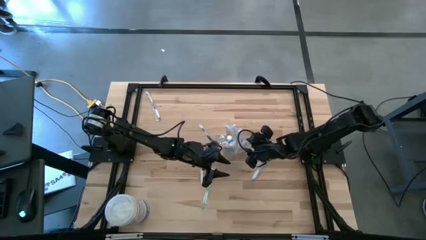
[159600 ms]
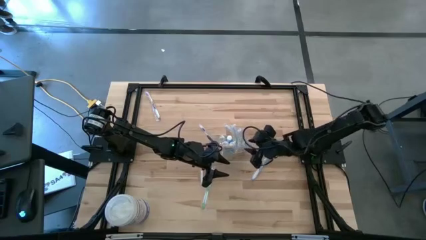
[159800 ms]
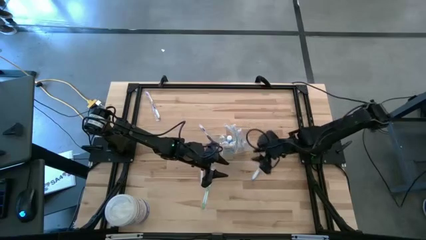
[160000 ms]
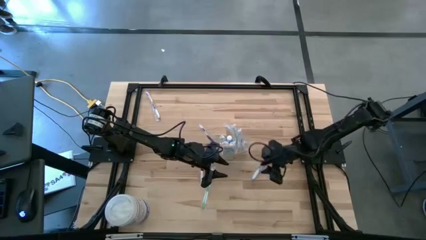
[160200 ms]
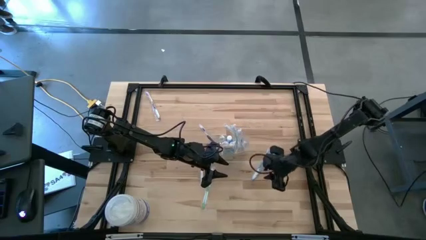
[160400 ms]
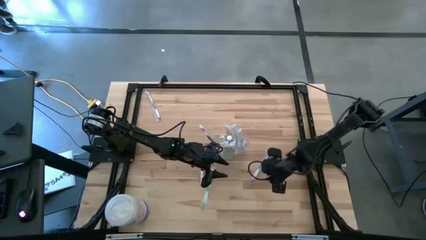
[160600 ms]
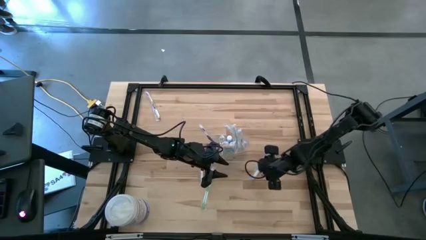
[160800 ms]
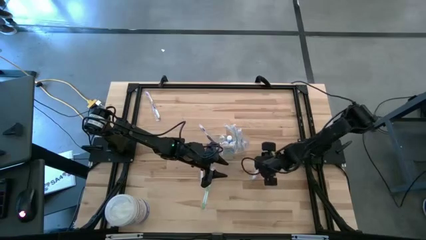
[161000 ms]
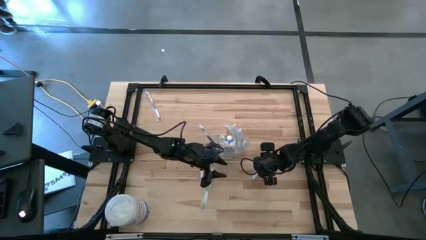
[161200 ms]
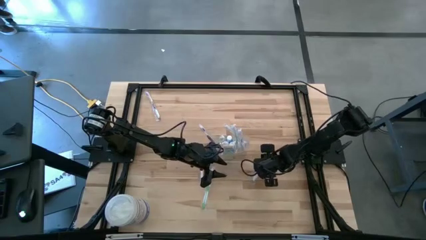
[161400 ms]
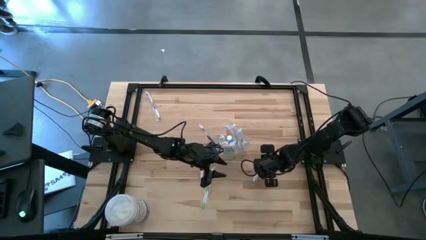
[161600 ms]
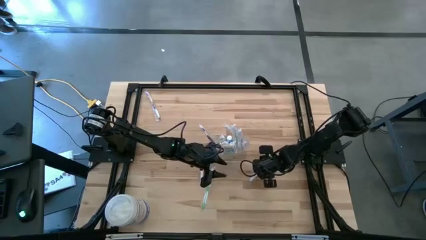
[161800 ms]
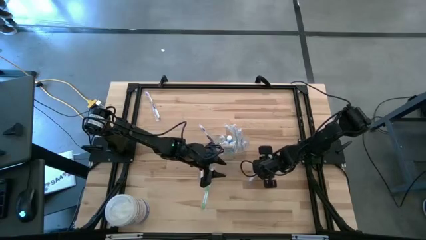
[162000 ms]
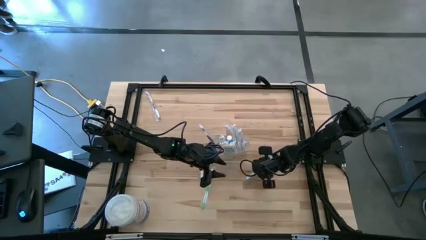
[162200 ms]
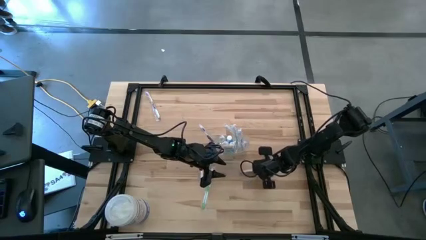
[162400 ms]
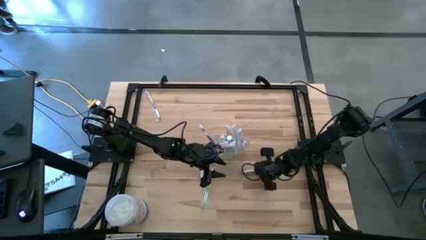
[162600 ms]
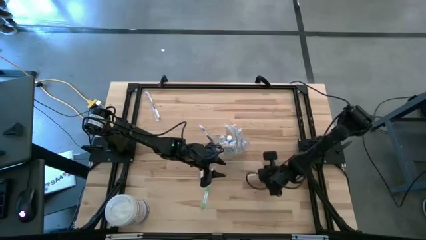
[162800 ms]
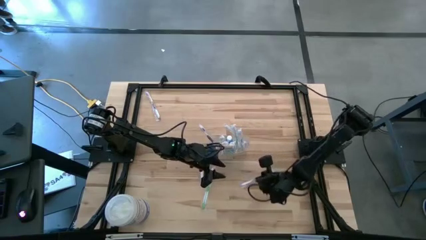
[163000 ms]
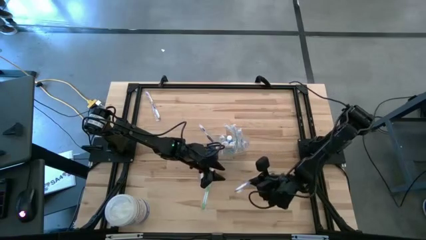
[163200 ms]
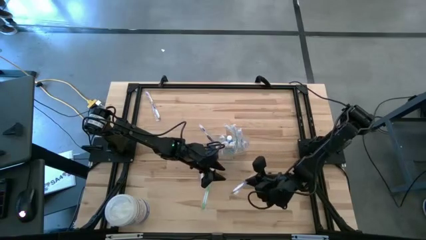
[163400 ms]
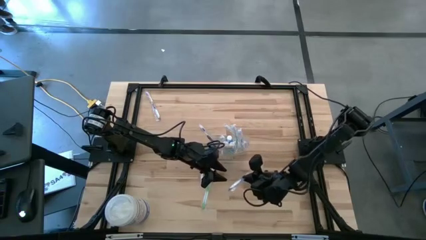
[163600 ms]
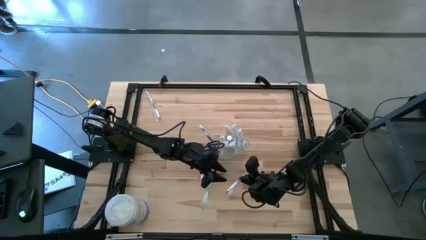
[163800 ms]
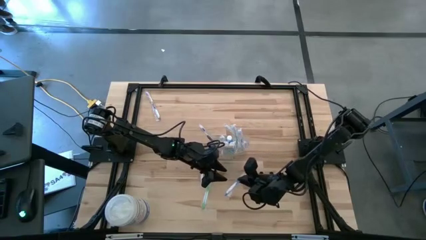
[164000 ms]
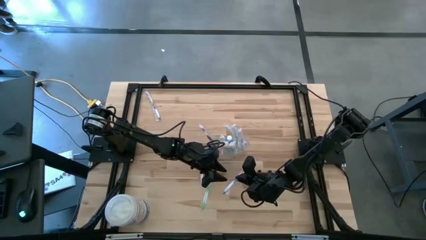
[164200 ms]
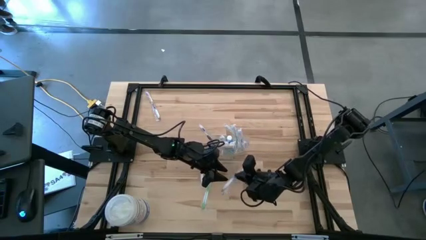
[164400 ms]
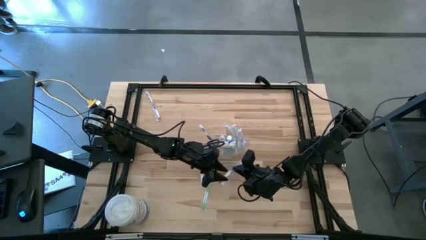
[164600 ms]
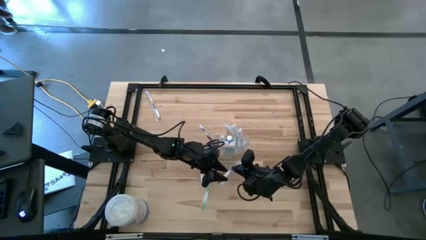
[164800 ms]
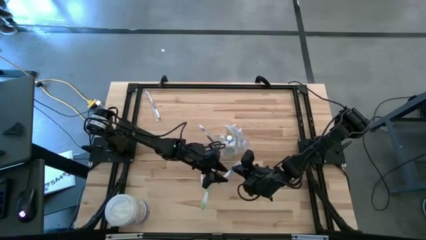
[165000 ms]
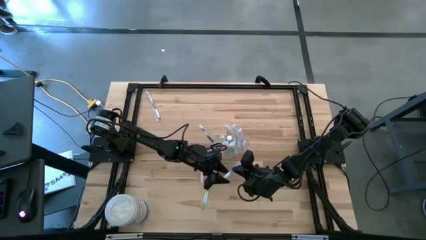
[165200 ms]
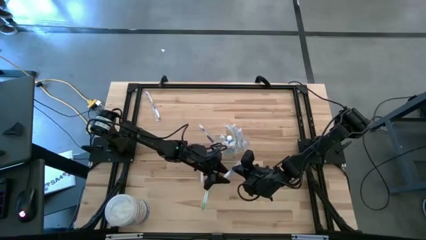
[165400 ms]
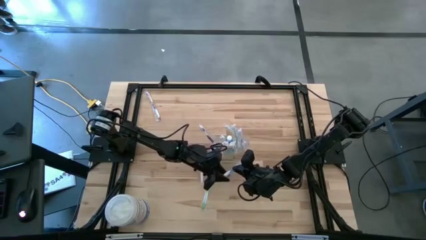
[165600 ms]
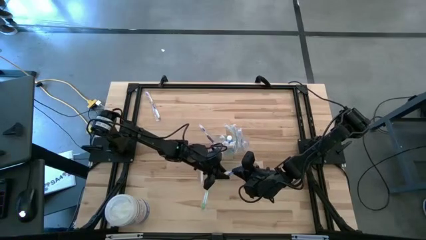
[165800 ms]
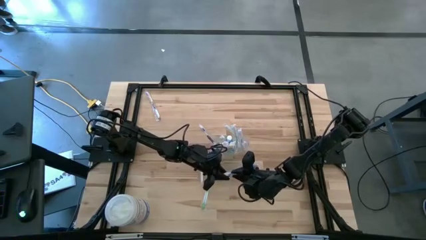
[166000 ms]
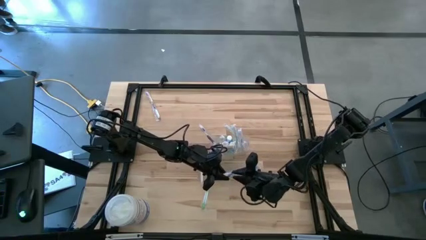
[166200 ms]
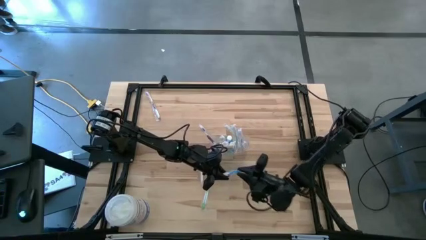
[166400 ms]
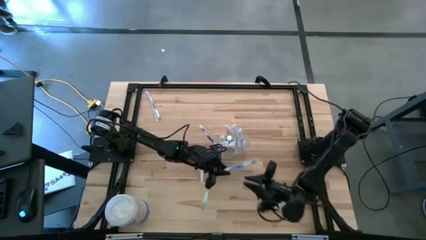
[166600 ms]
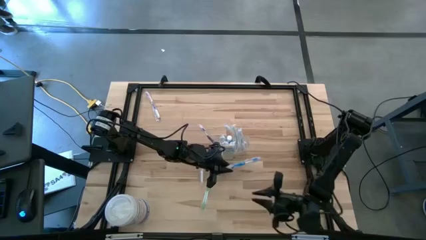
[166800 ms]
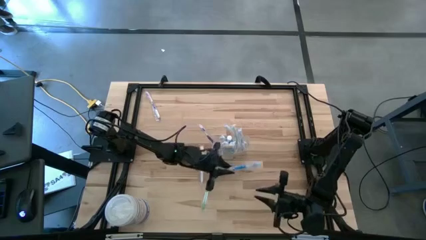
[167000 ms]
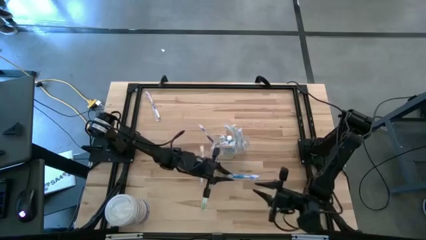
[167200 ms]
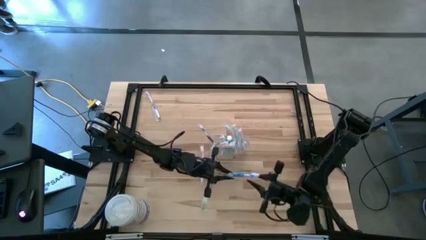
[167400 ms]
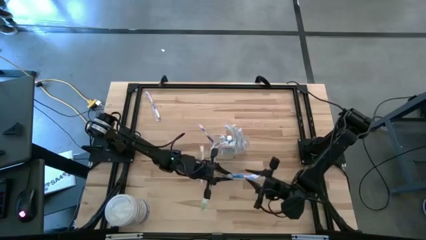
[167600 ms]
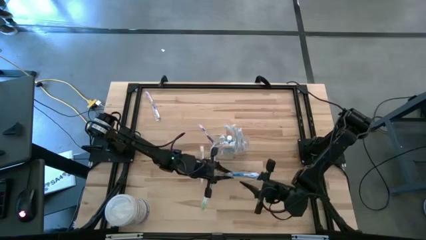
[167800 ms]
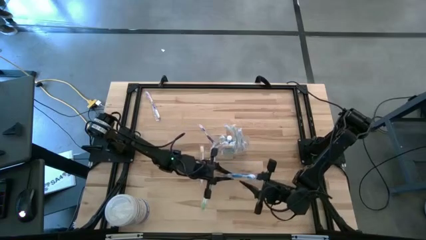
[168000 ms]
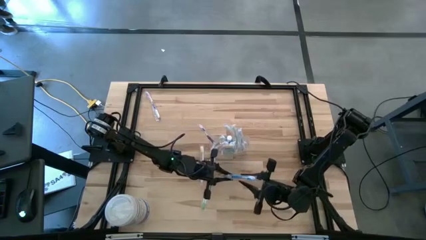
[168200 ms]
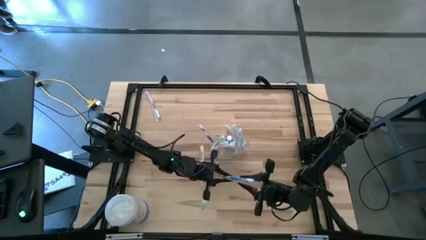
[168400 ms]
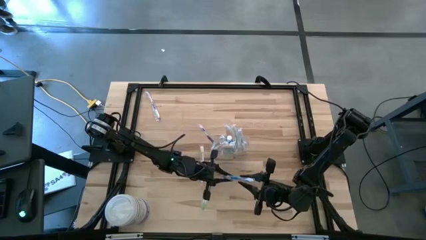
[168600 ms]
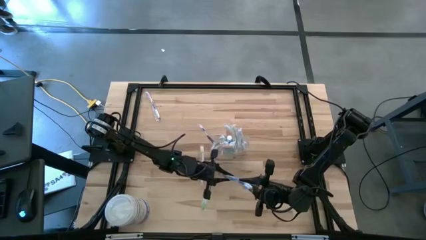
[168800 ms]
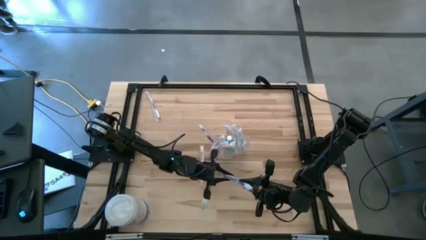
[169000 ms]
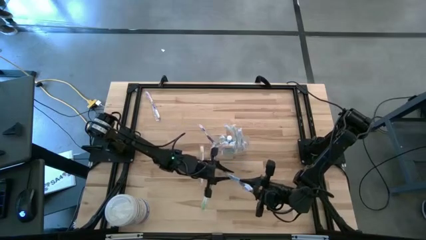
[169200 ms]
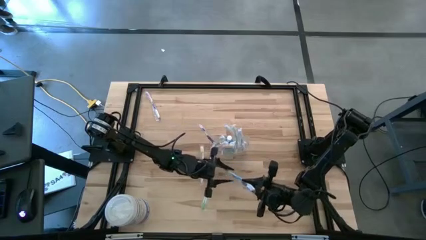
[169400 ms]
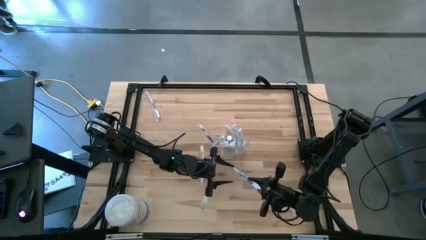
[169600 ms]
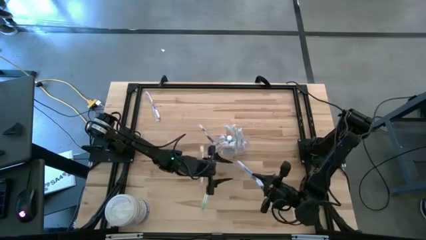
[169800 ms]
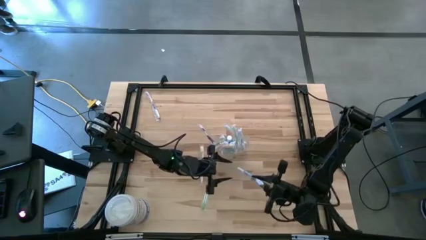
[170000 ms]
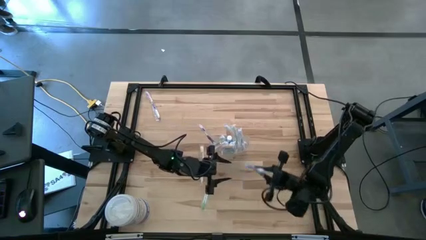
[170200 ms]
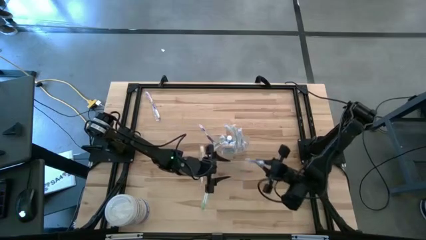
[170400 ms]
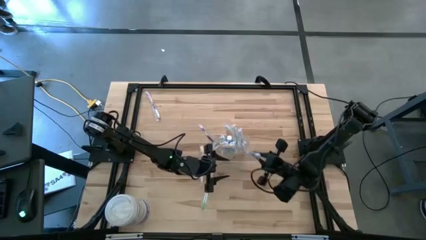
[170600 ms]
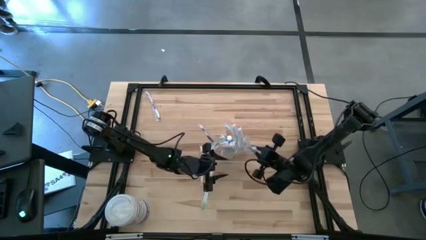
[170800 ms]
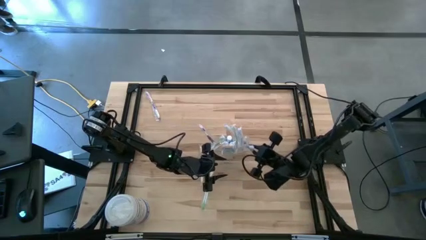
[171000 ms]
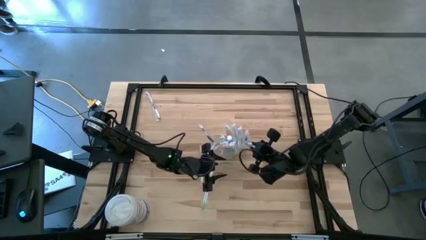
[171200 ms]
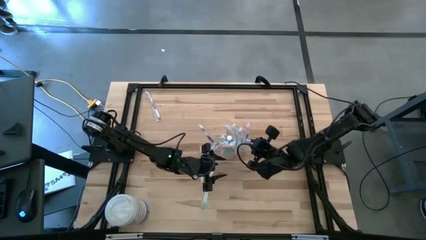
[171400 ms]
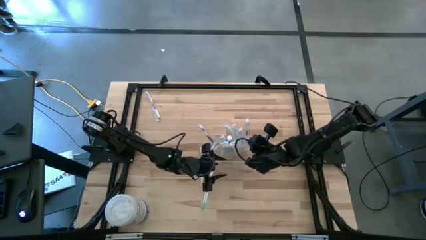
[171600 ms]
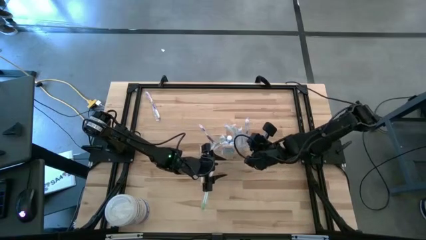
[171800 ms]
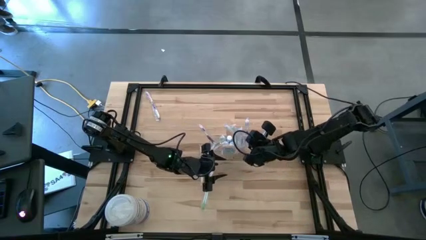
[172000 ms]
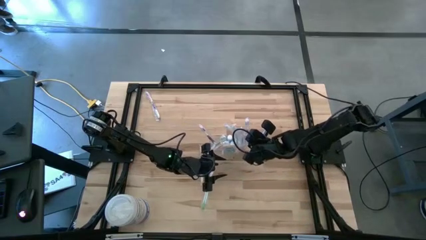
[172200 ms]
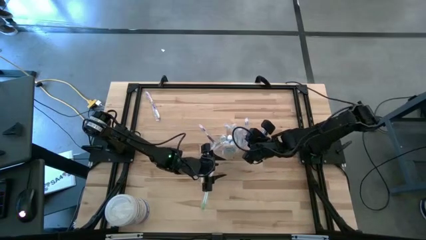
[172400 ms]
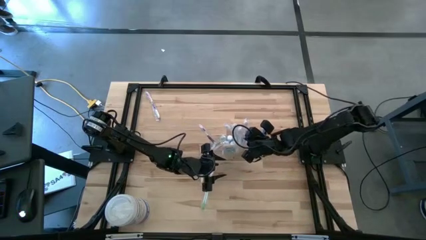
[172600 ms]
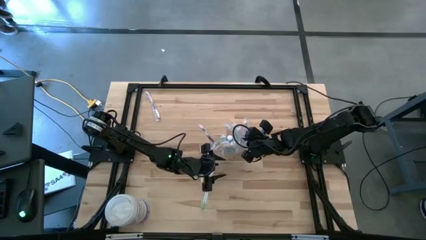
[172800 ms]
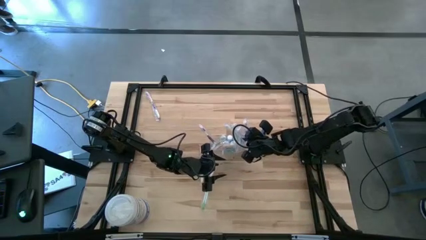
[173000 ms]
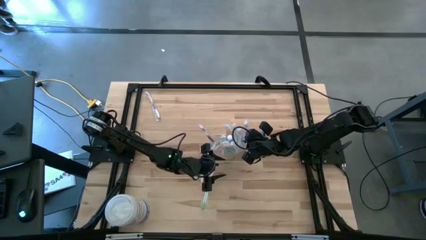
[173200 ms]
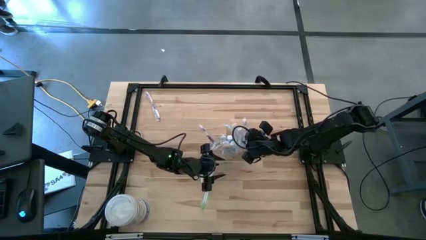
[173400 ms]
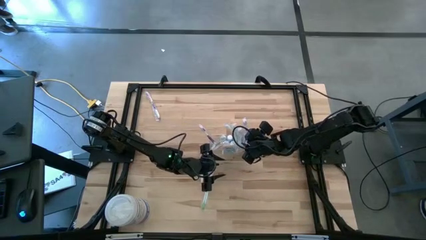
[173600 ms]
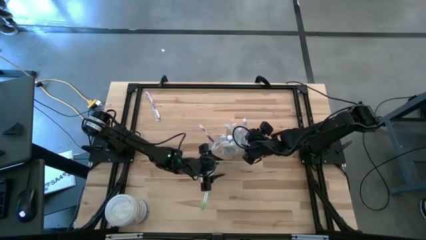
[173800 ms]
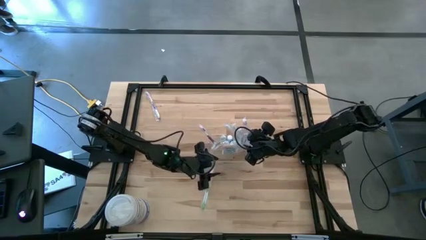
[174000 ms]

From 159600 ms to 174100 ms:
Task: Pick & Place toothbrushing station
Put the blue toothbrush into the wire organizer
